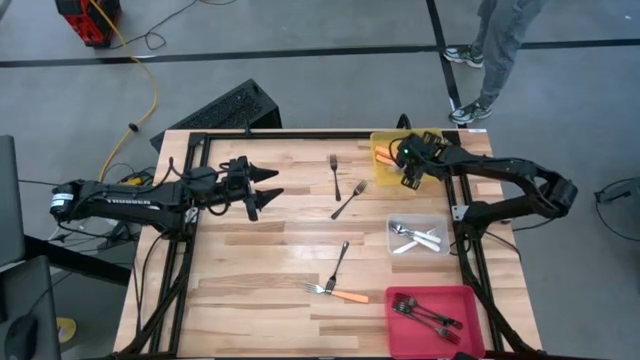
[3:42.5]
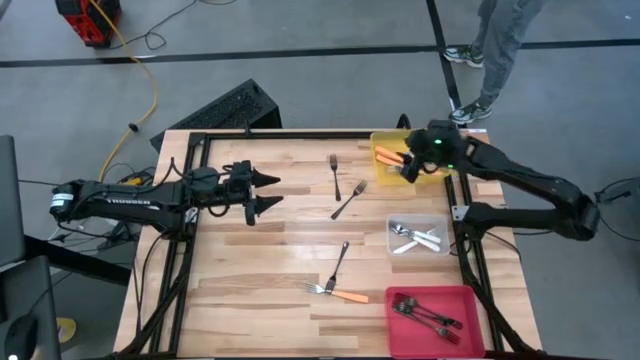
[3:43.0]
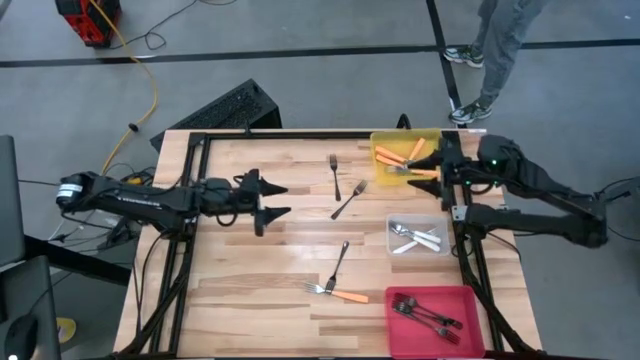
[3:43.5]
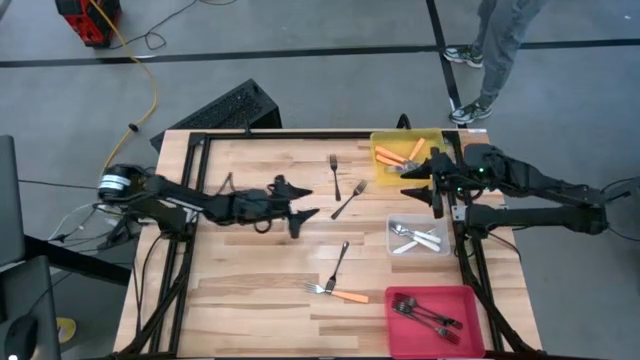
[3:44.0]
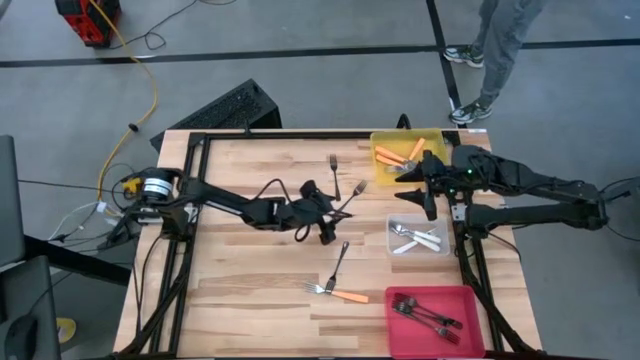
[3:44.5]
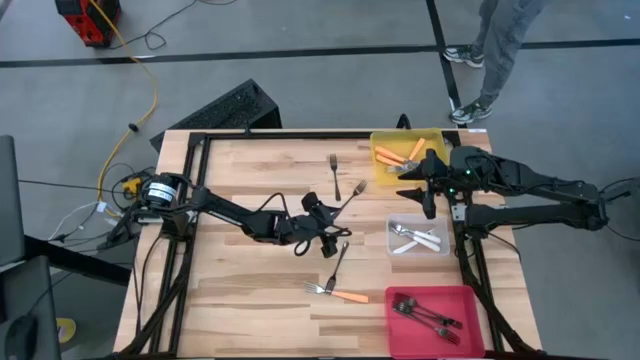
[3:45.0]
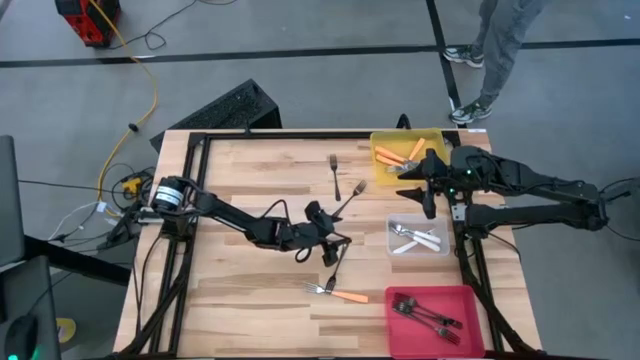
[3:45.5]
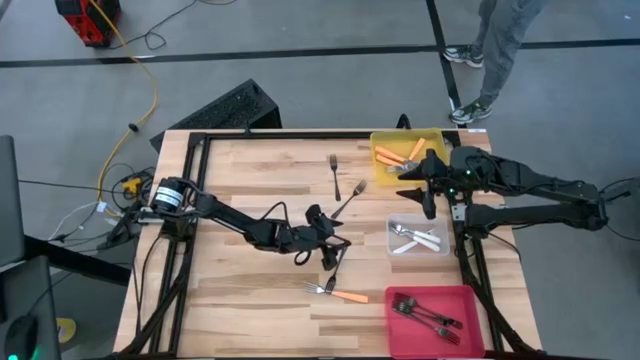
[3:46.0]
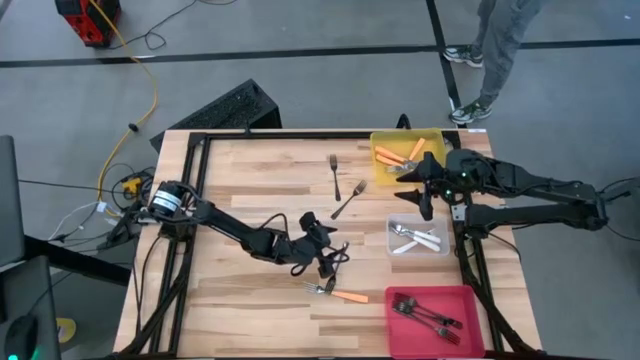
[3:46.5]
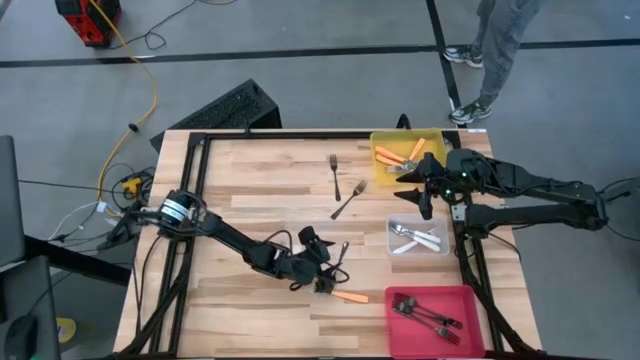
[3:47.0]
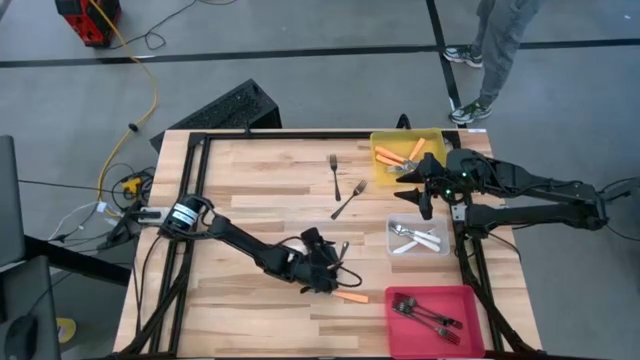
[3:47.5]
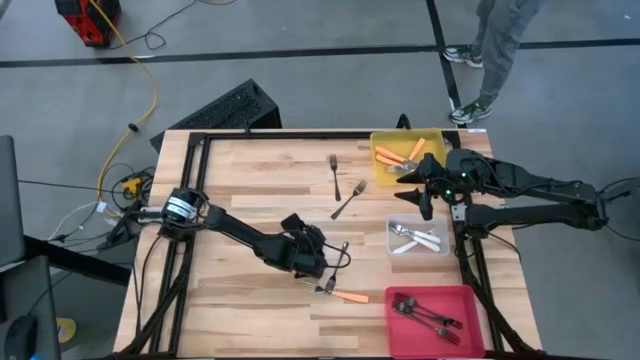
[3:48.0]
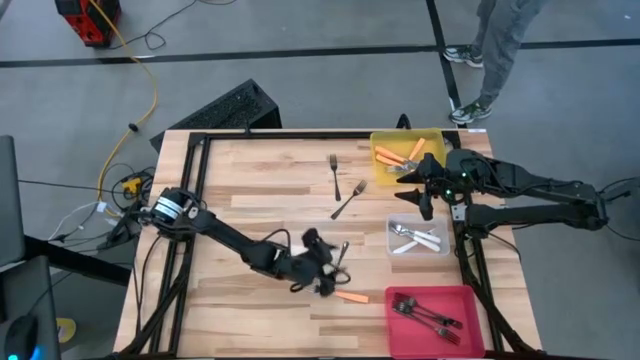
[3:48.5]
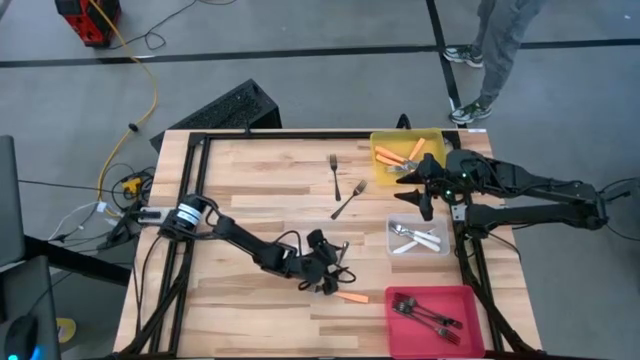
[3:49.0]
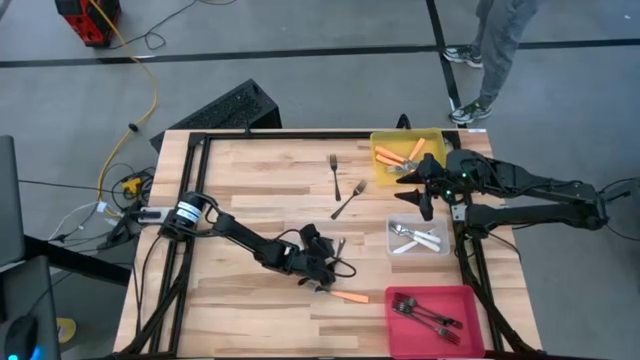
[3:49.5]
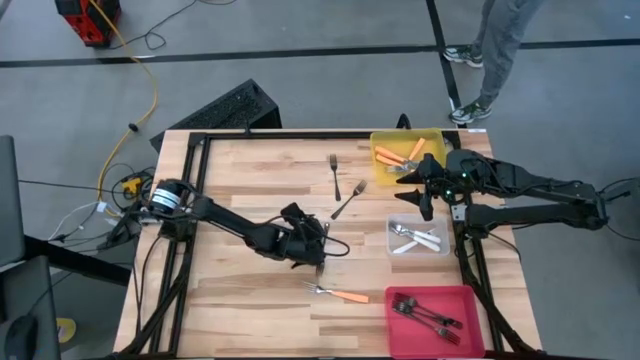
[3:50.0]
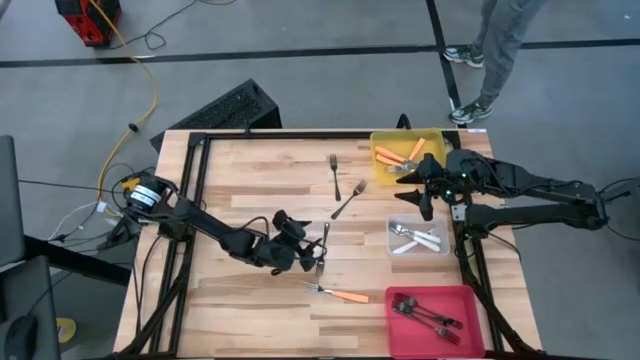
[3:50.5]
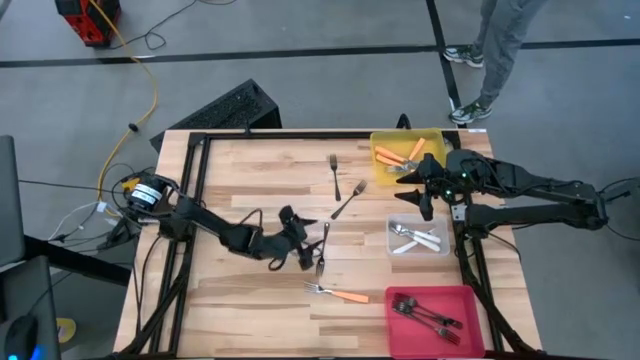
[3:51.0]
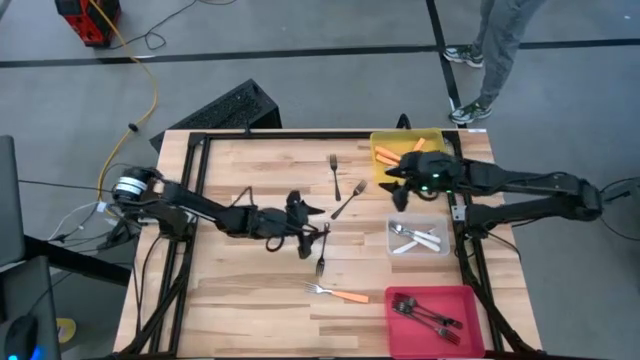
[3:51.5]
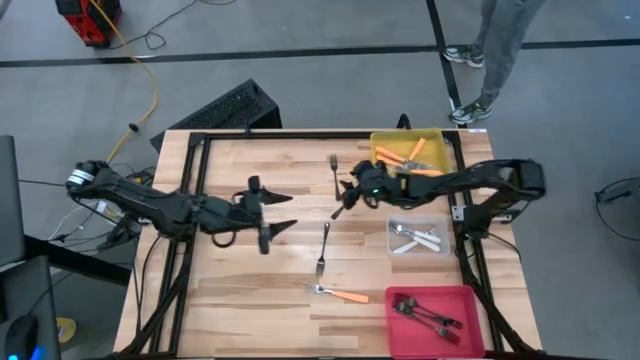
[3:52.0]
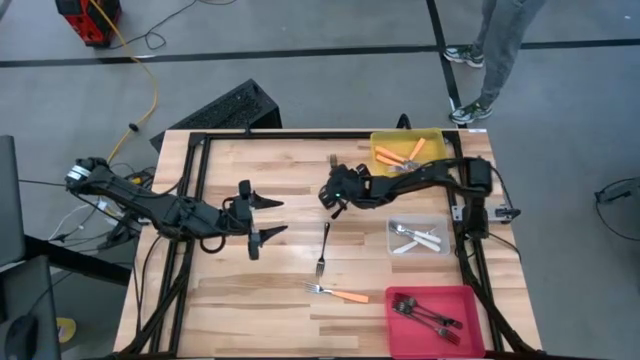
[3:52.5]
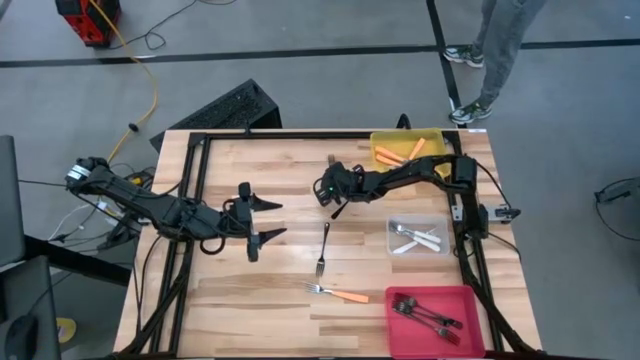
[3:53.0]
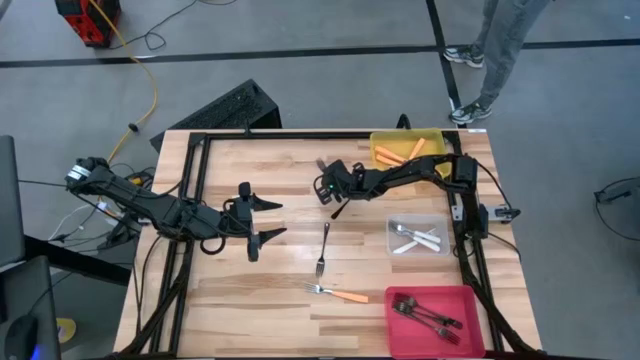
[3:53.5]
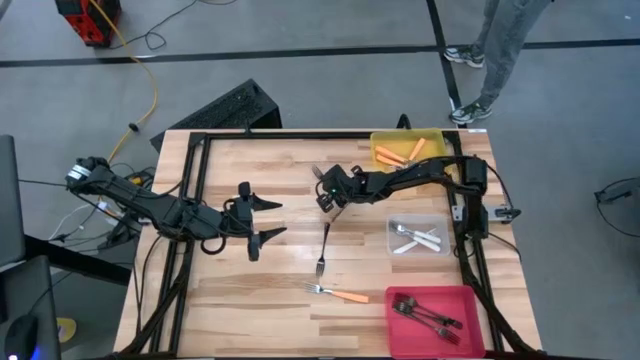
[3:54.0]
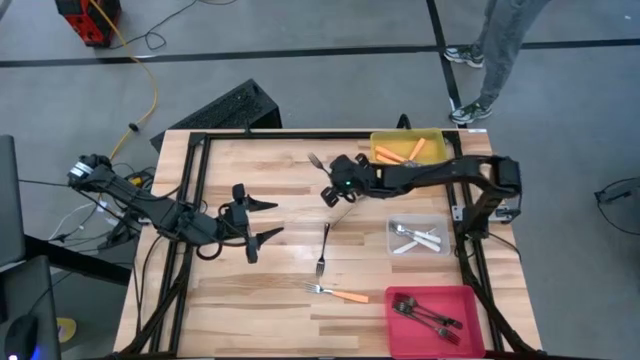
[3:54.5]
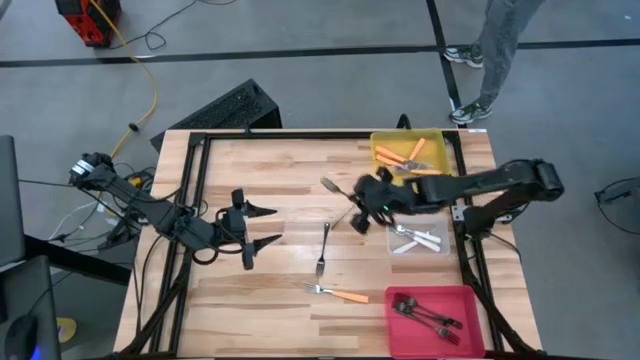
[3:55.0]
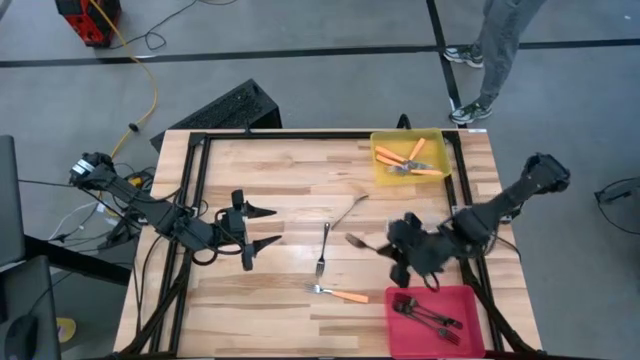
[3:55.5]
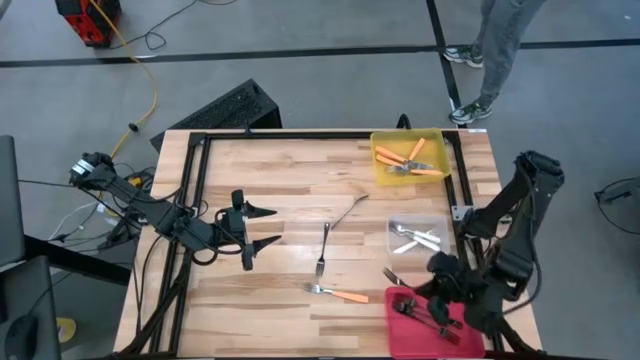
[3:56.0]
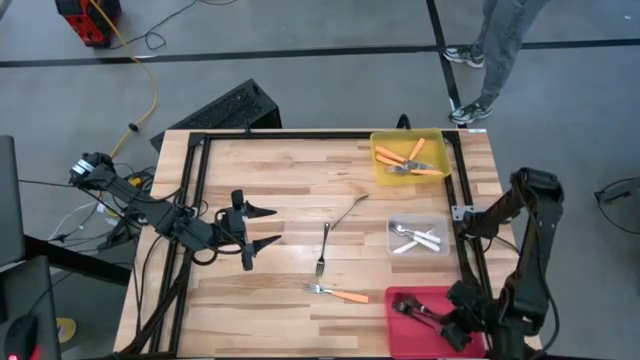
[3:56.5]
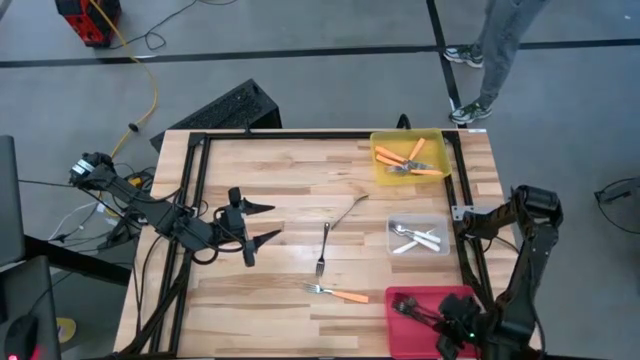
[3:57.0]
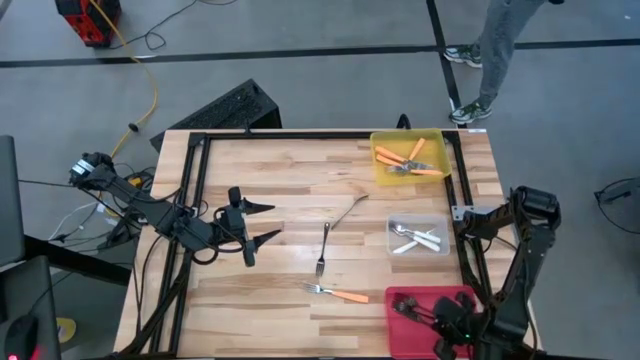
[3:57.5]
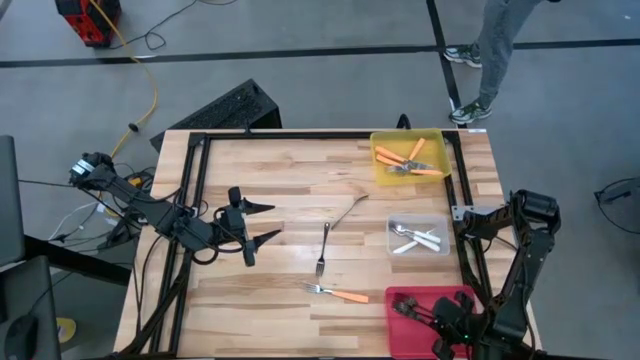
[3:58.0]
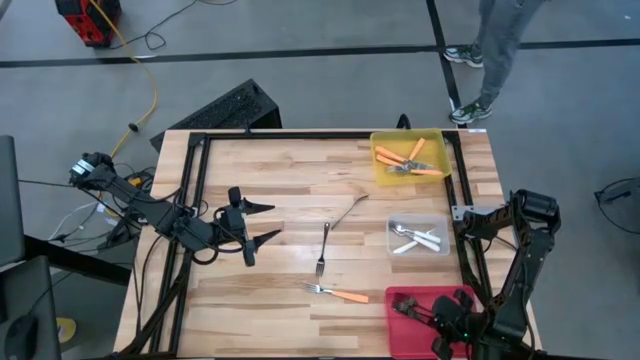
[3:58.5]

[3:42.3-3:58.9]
Task: Sort silverware by color (type)
Put the black fork into the red bin

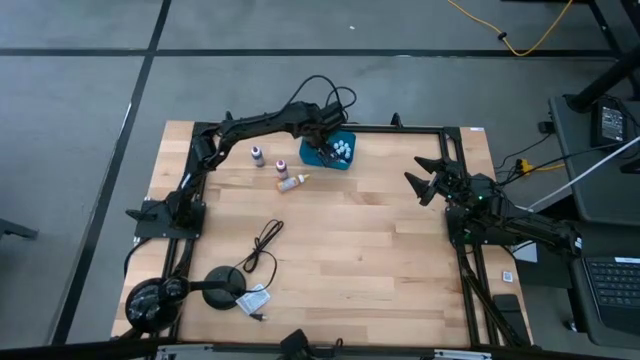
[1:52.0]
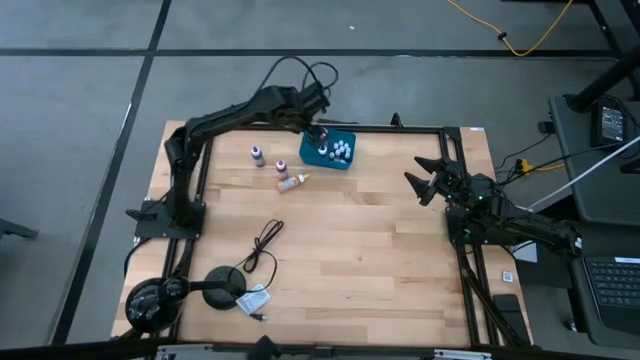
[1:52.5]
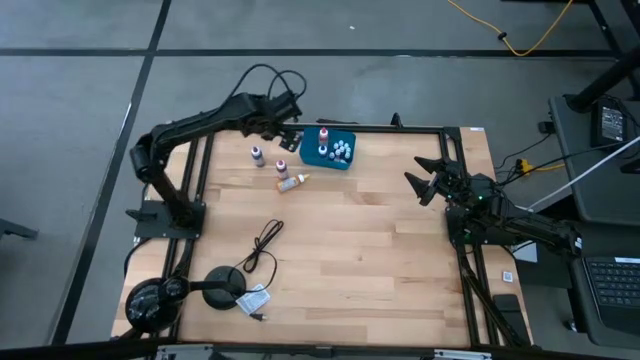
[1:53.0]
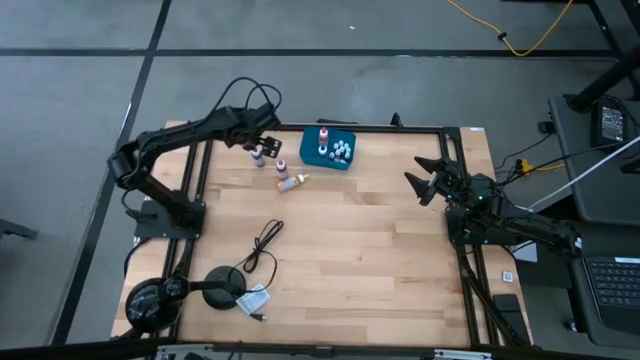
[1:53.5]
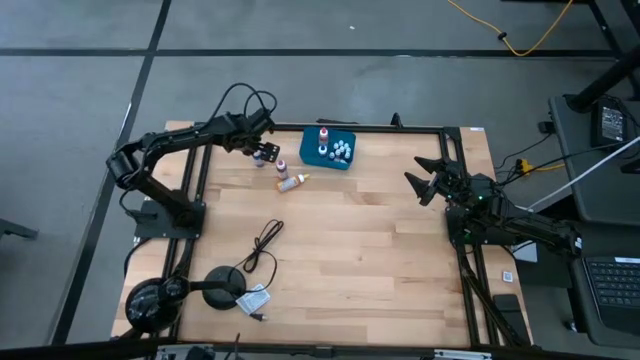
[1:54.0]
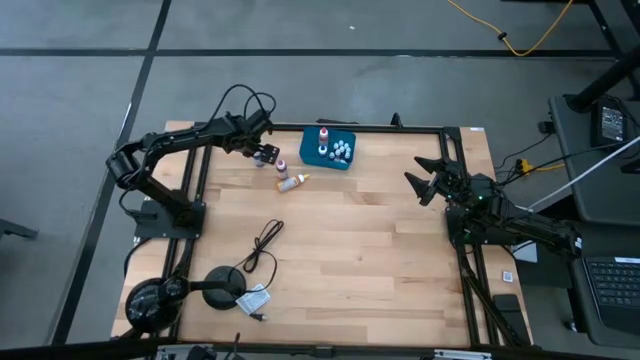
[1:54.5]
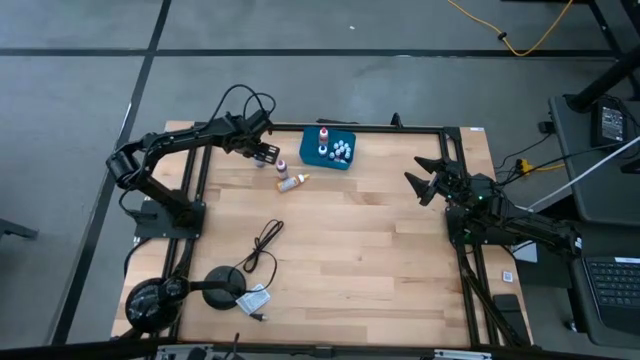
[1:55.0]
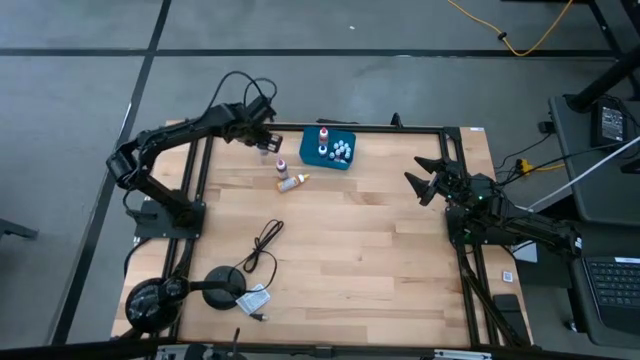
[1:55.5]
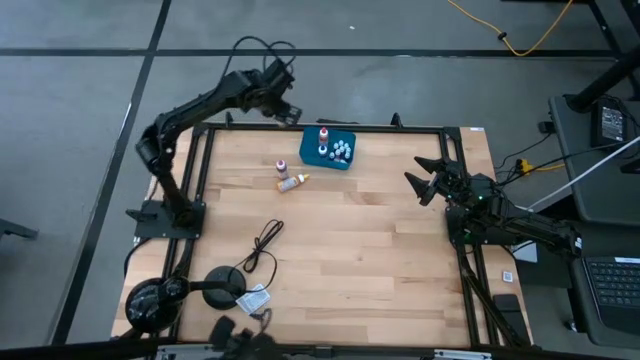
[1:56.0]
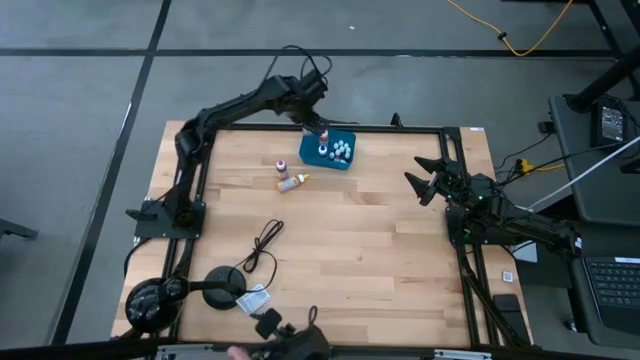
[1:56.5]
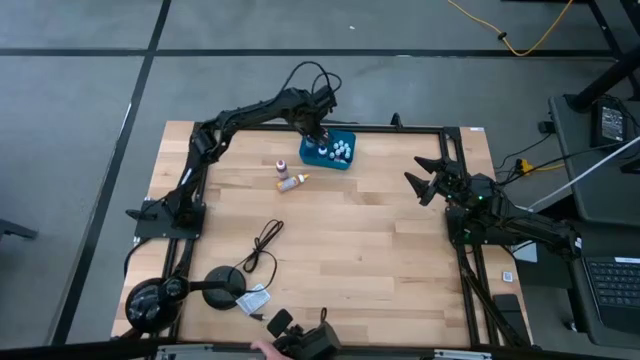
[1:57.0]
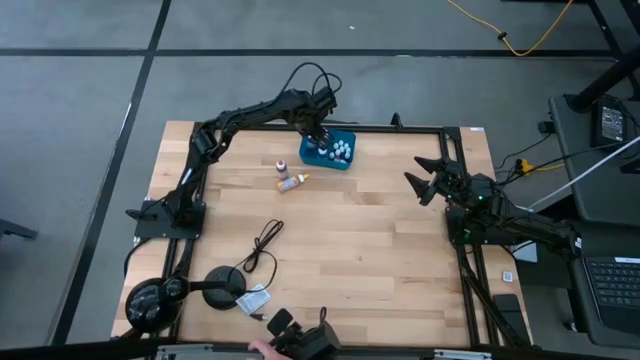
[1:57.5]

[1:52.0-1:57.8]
Task: Pick & Place food coloring
Put the large purple food coloring bottle into the blue container
